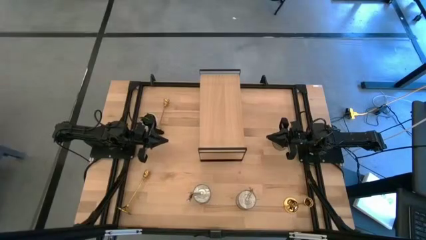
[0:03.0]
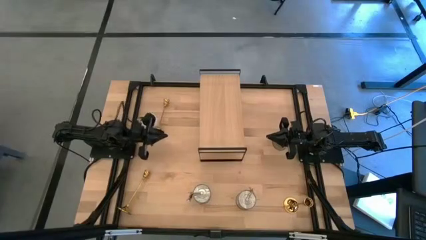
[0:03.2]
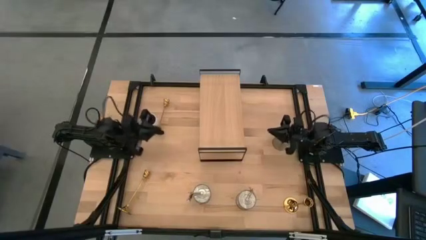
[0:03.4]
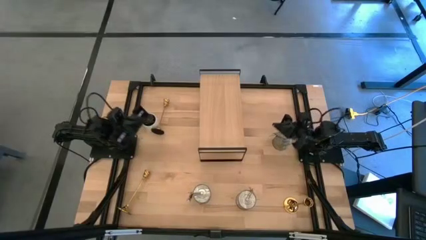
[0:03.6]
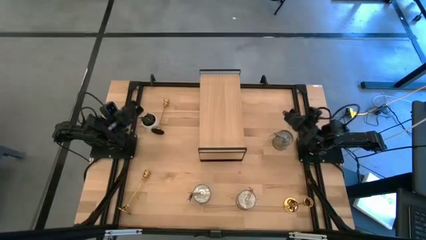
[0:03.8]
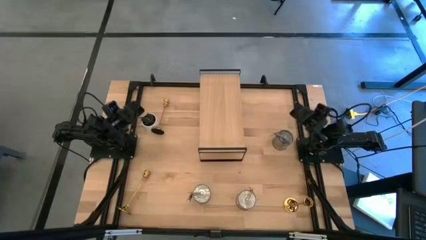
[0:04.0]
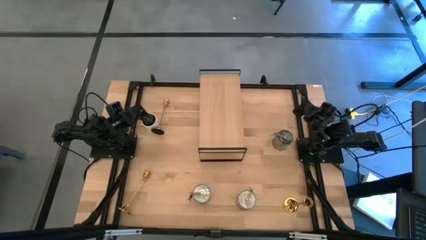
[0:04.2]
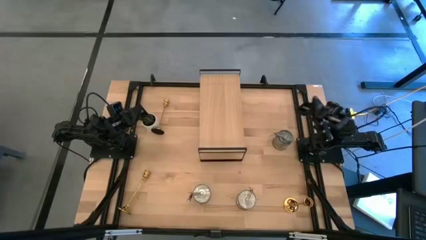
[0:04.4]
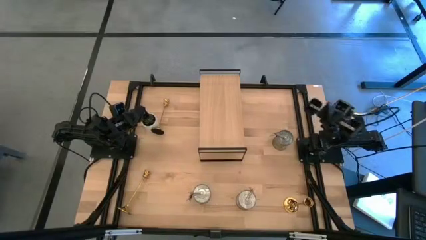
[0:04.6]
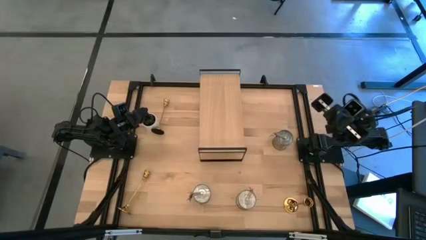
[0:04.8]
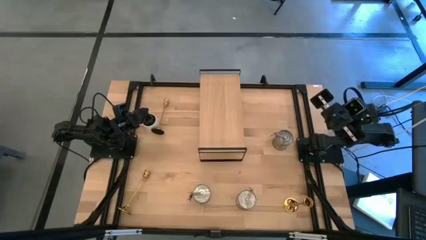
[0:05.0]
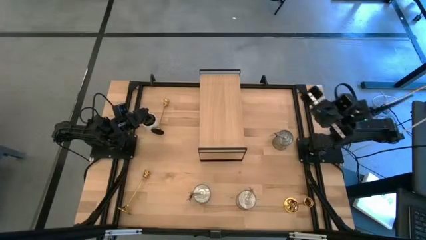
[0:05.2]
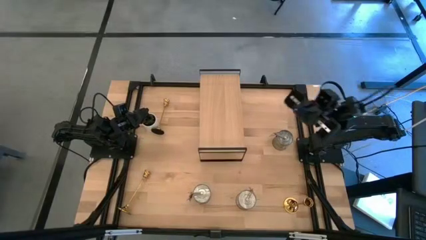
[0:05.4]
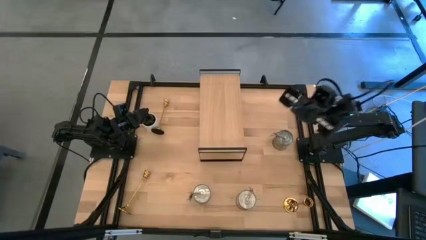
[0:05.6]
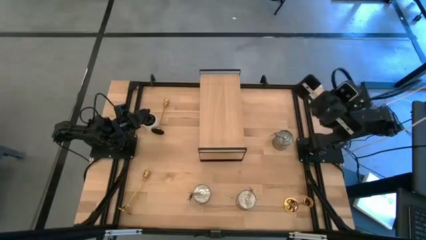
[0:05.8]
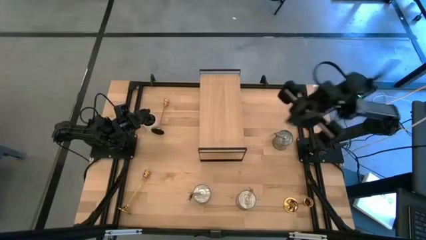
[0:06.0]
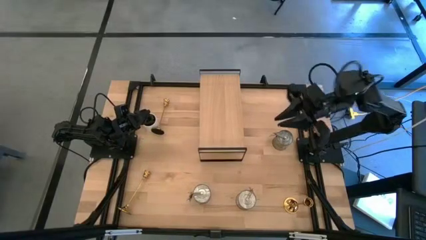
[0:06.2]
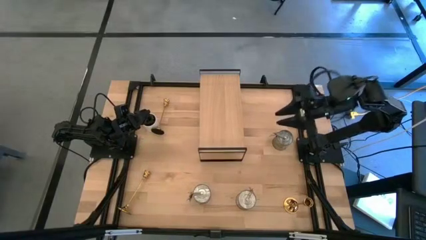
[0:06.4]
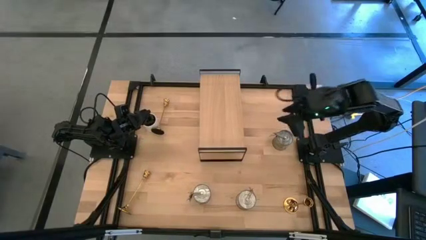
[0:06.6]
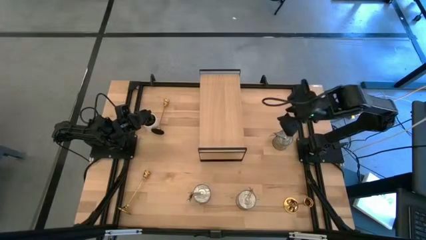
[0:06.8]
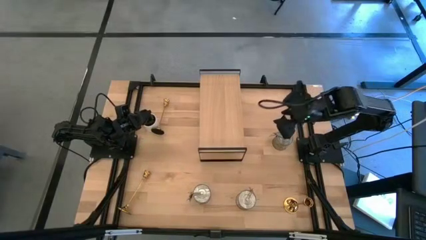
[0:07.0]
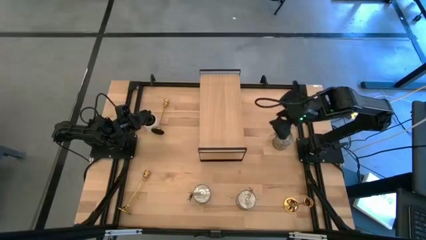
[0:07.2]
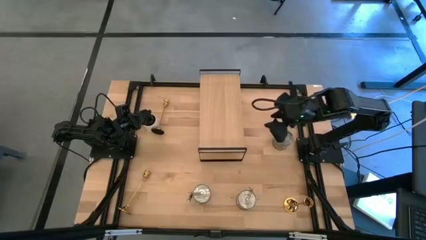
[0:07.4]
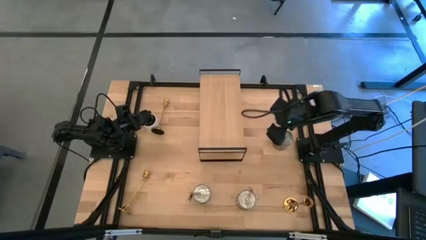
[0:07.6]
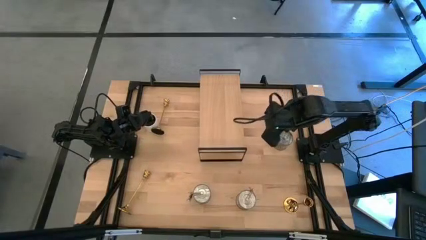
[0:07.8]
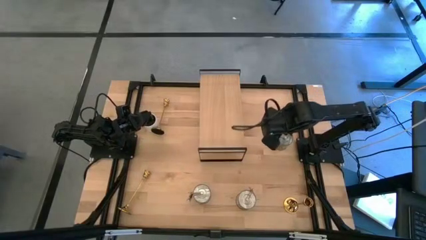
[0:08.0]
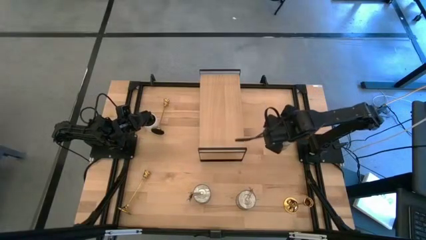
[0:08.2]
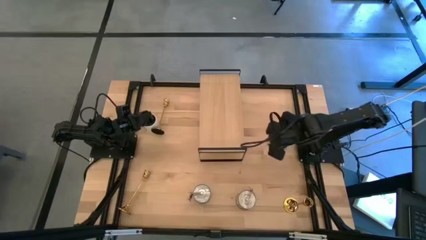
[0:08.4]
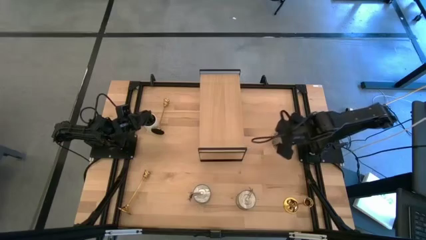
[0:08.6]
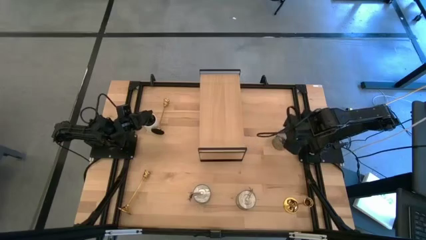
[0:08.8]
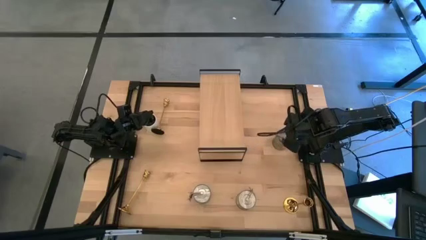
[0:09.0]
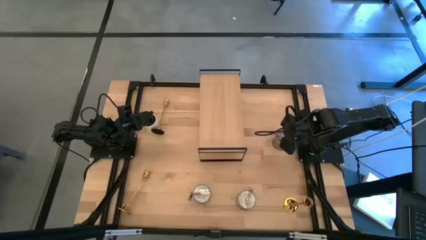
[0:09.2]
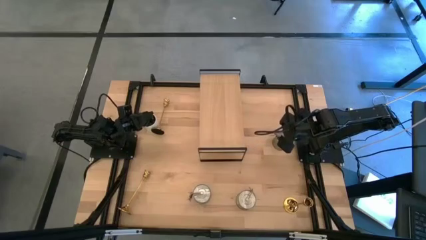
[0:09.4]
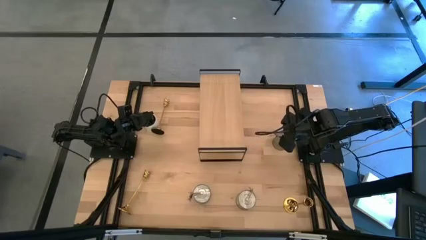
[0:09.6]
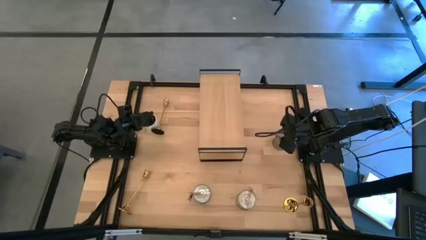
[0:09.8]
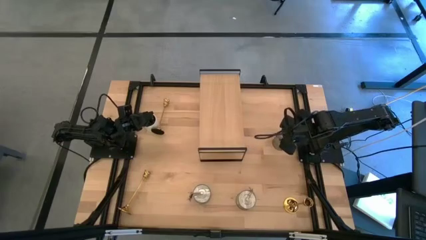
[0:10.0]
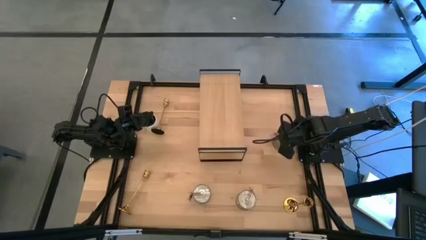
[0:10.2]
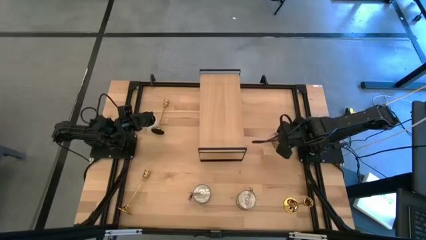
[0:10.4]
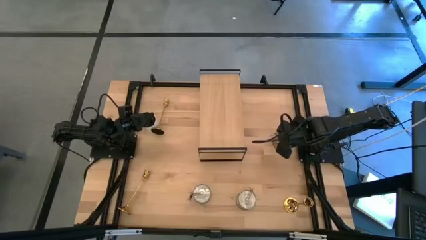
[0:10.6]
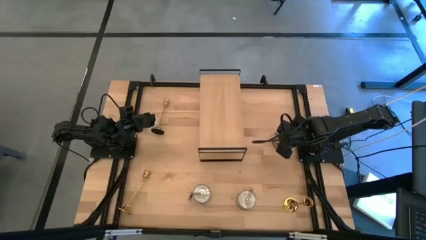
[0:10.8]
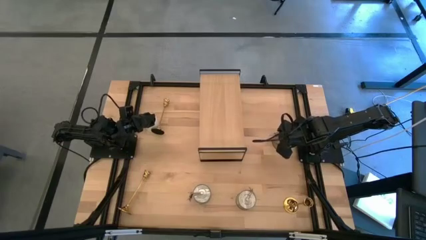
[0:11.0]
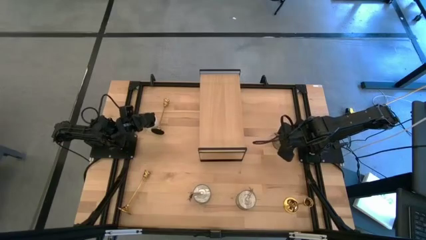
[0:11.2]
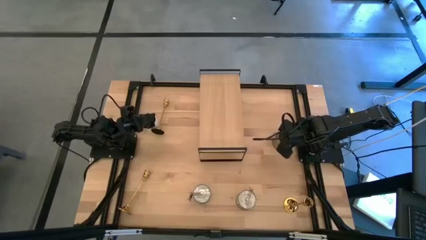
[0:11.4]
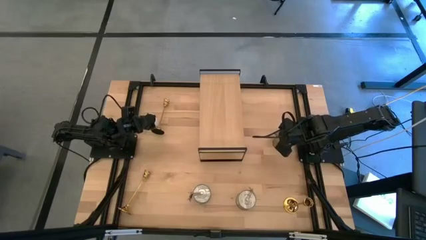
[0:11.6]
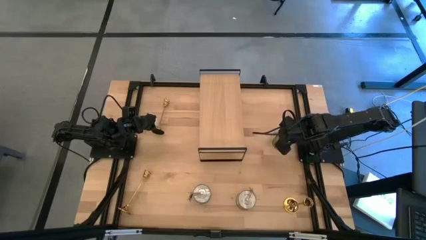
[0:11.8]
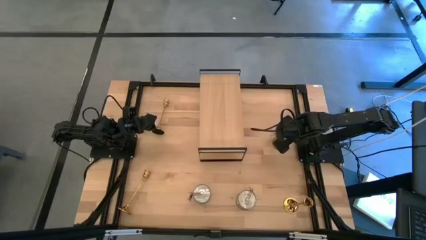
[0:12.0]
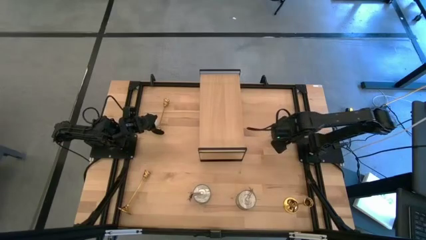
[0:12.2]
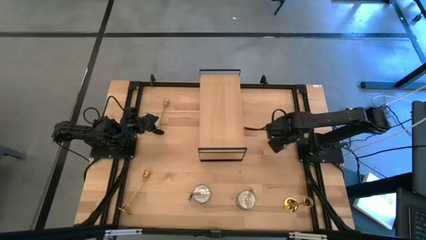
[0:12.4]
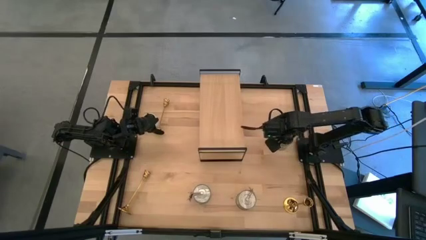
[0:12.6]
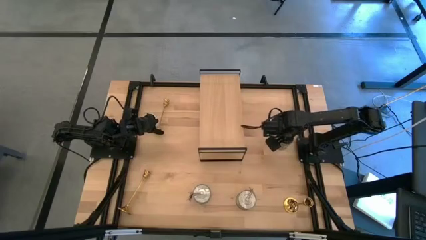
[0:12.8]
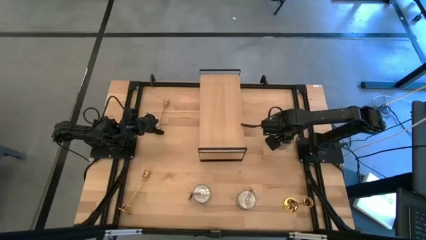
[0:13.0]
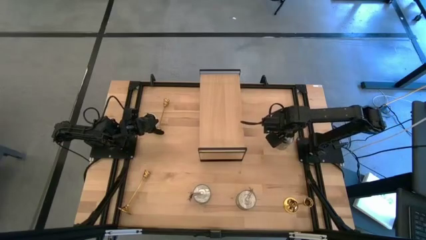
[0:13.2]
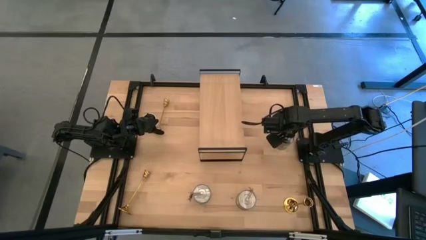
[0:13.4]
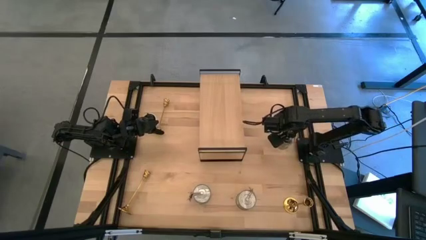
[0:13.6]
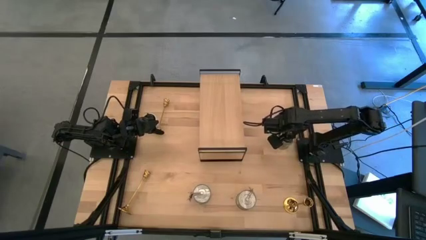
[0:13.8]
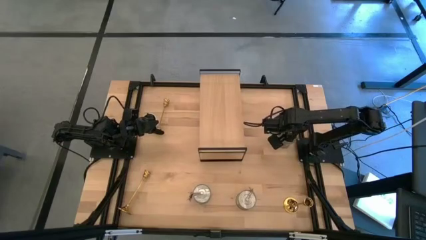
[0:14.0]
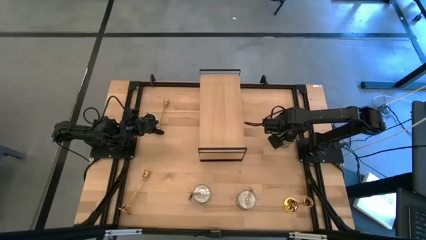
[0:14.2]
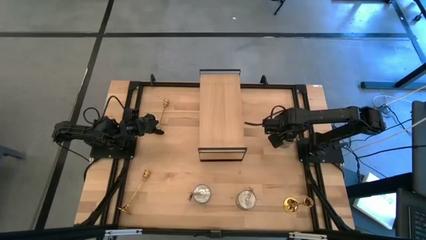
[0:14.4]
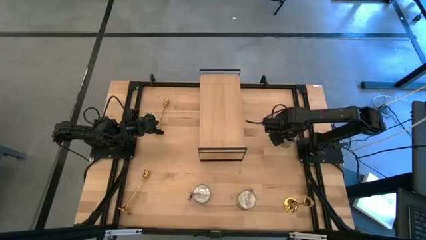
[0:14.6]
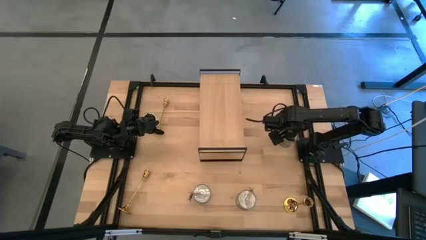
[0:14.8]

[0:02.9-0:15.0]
Task: Pick & Place candle stick holders
Put the top silver scented candle on the shelf
